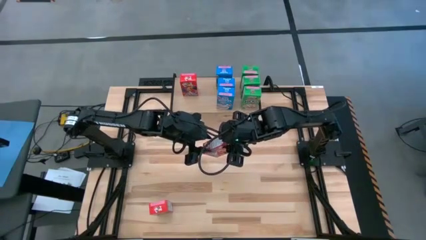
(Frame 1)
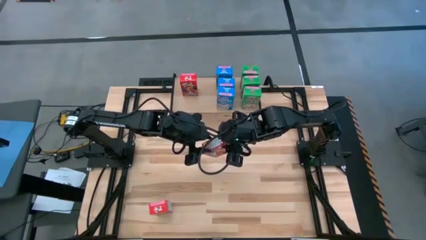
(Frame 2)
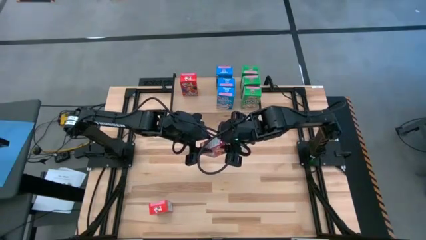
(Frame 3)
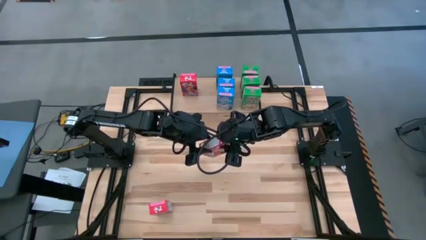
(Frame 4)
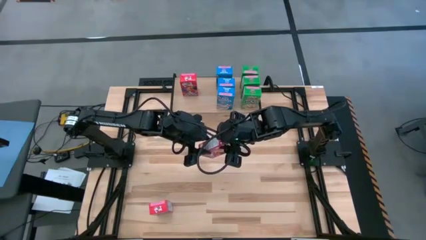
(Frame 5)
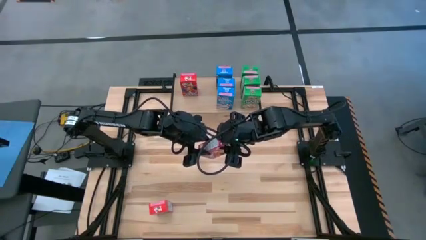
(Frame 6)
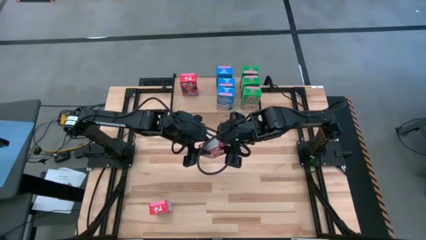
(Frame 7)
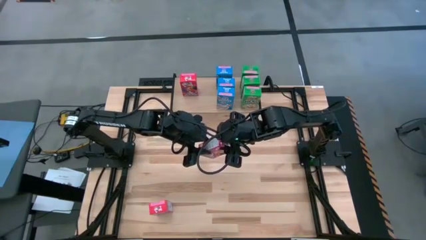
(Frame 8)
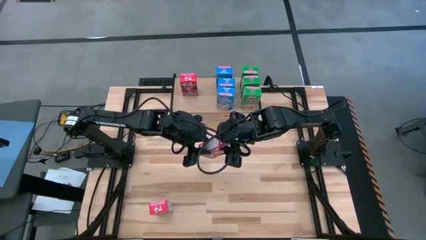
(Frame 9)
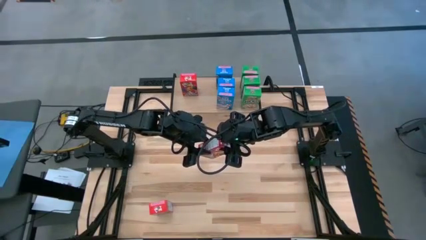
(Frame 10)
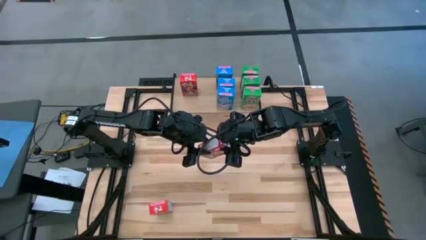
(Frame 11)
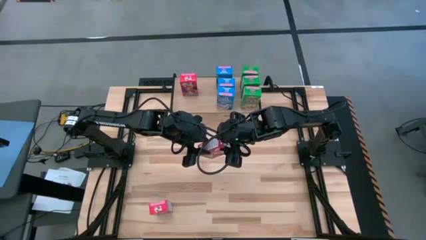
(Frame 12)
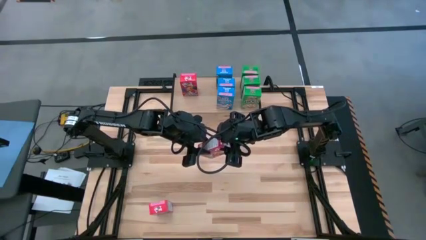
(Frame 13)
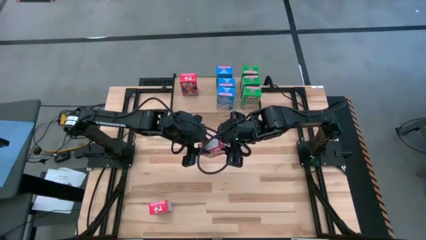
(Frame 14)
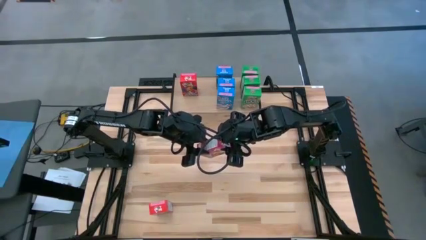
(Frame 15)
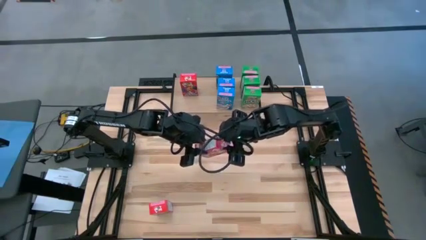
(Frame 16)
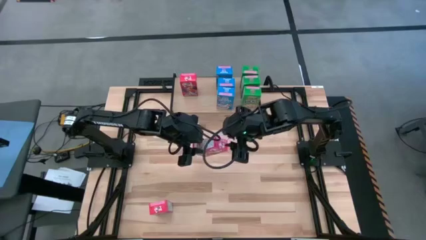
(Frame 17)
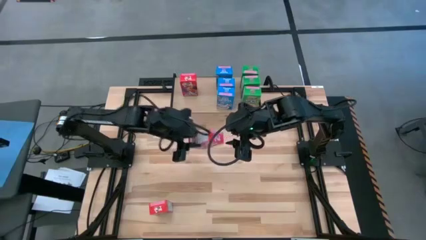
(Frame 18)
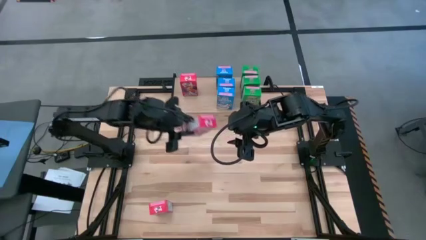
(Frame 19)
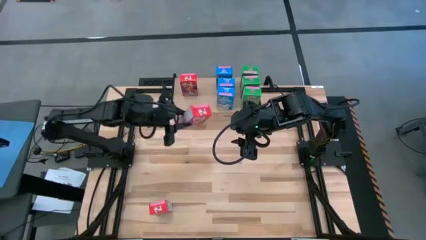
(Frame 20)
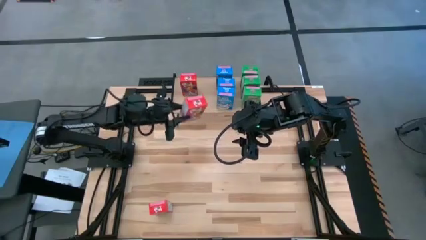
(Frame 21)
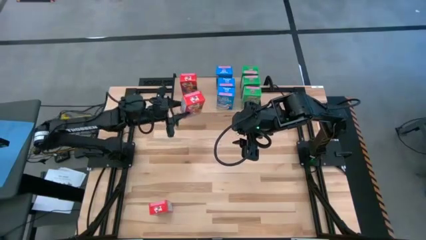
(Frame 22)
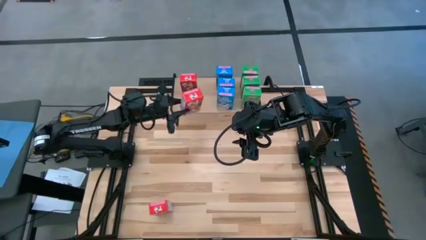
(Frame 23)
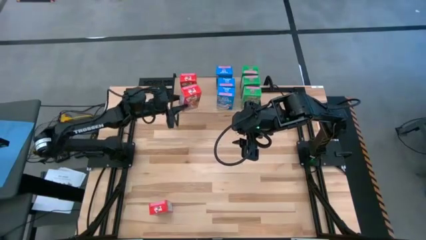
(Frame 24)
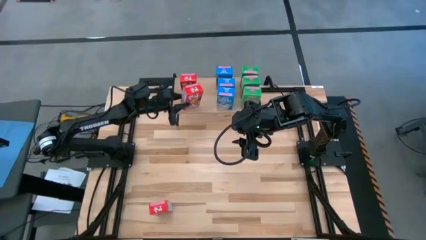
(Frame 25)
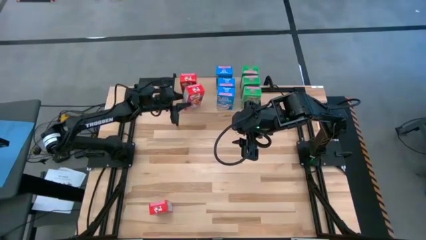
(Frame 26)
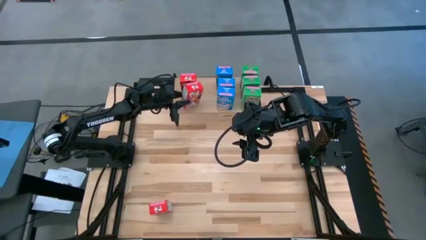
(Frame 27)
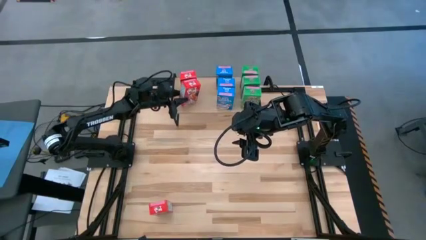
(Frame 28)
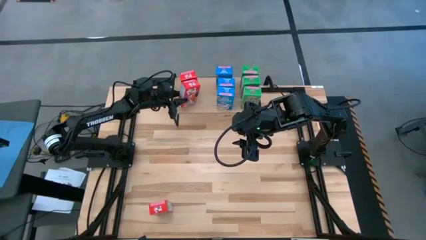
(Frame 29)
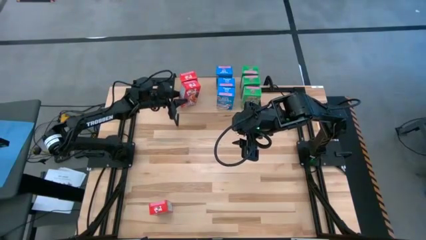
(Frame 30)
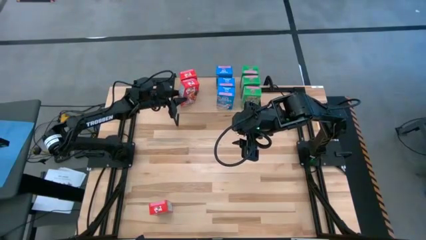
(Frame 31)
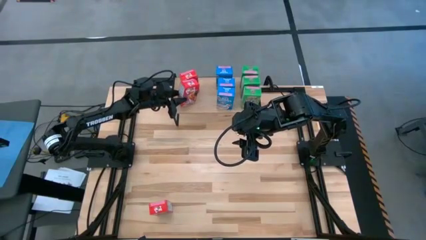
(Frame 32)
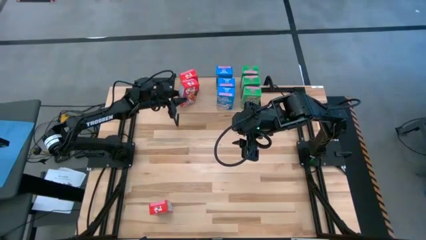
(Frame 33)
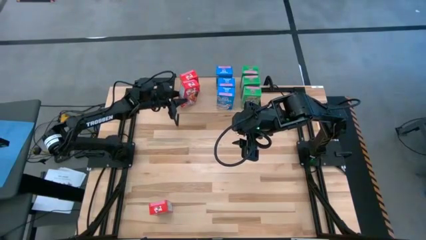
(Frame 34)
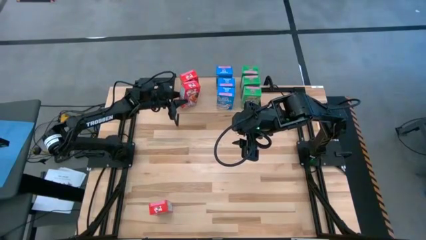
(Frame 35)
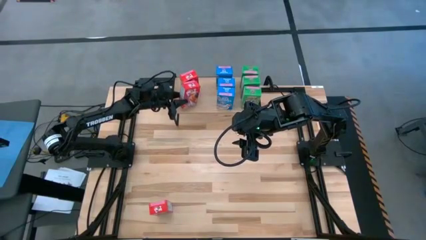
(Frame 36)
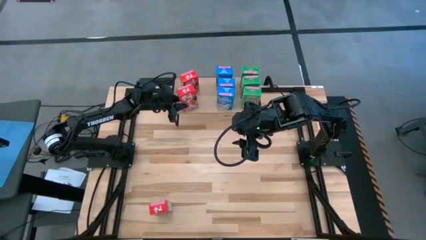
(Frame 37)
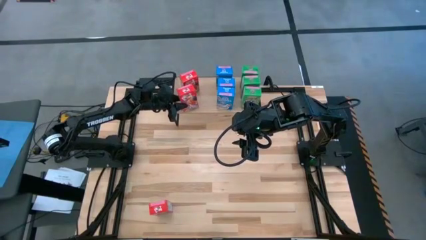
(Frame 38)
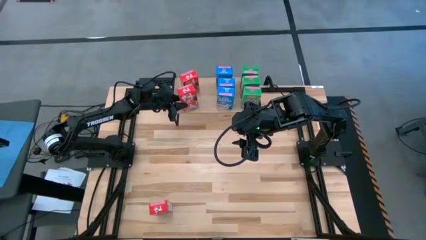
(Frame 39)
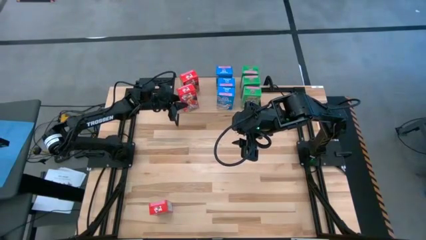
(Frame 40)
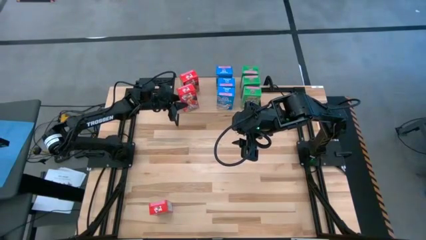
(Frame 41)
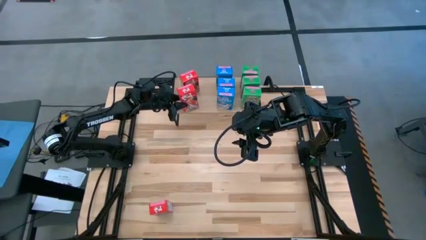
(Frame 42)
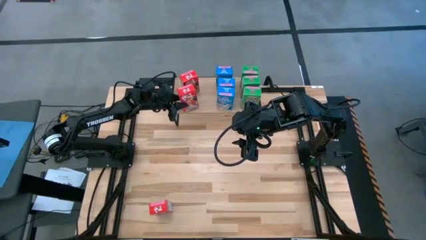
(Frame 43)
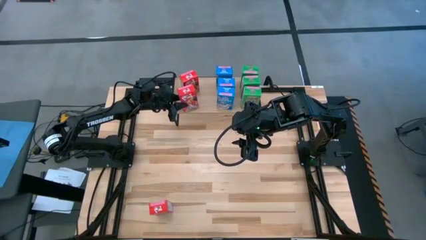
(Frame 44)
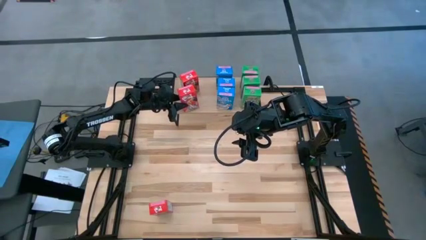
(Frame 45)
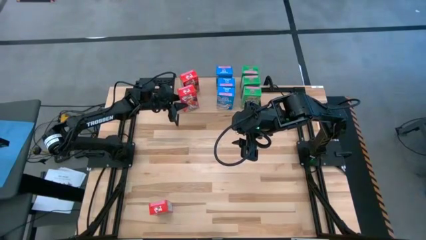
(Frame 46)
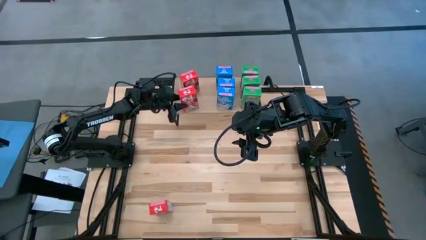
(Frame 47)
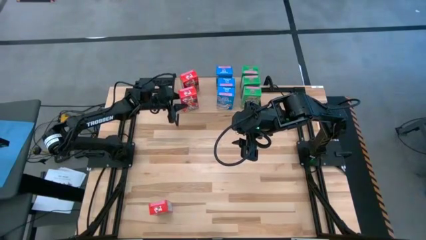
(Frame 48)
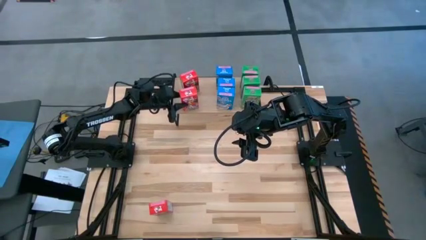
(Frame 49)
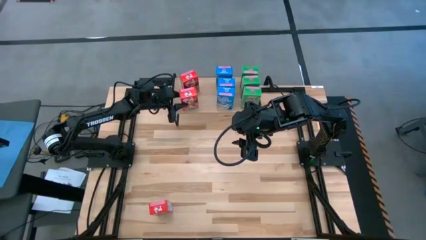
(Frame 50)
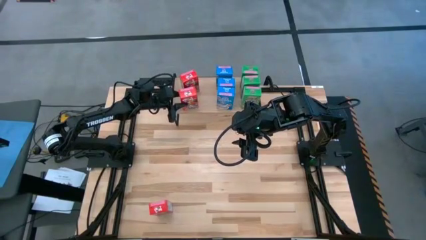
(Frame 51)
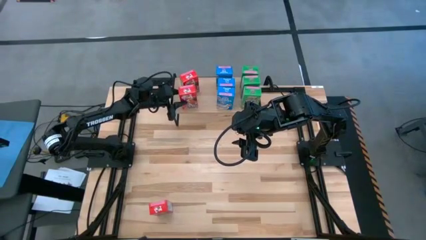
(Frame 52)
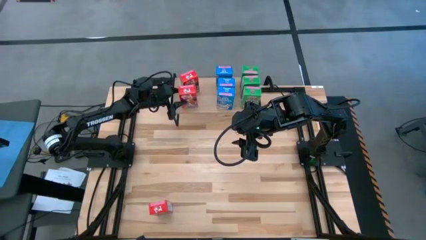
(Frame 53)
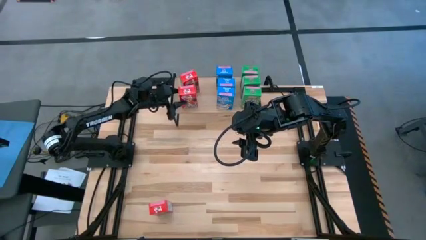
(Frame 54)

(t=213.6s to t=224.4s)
Task: Stack cereal on shelf
Put the right red cereal box on the shelf

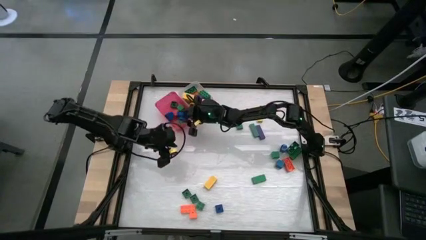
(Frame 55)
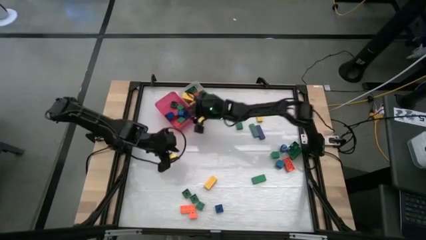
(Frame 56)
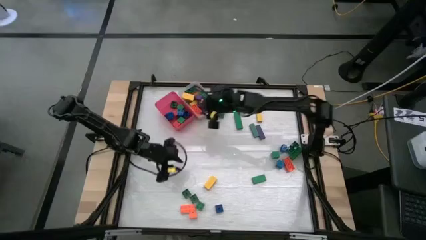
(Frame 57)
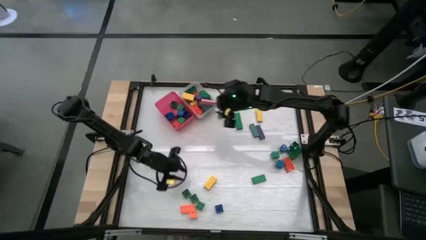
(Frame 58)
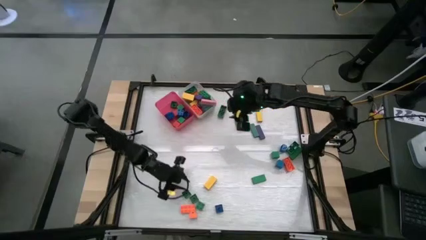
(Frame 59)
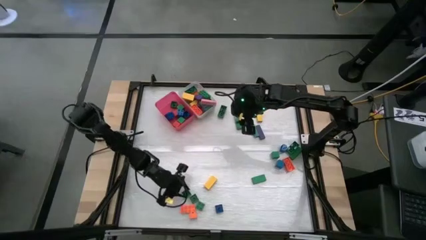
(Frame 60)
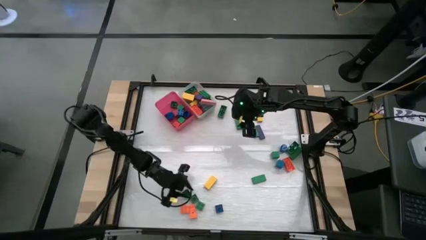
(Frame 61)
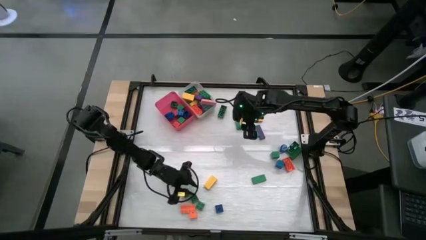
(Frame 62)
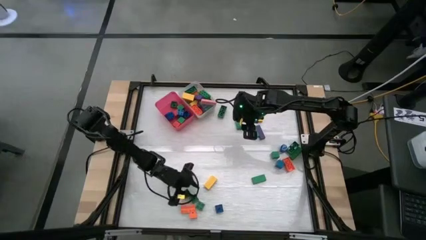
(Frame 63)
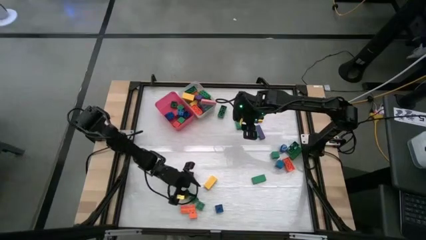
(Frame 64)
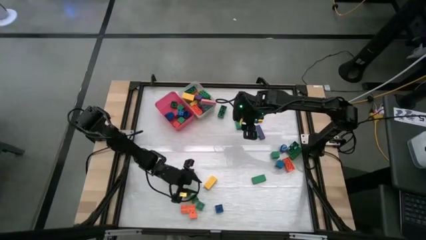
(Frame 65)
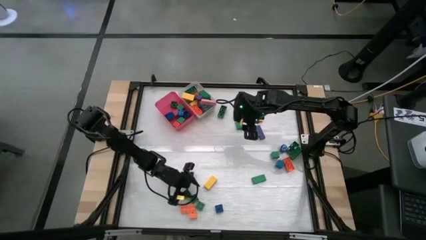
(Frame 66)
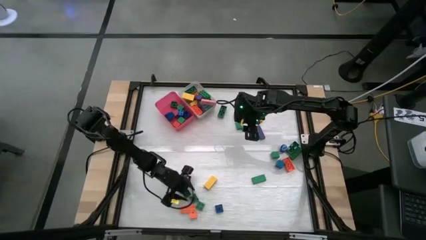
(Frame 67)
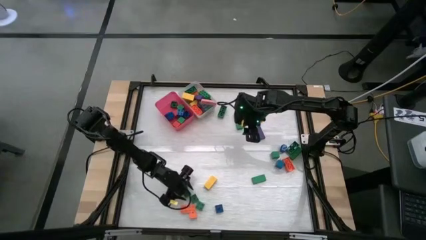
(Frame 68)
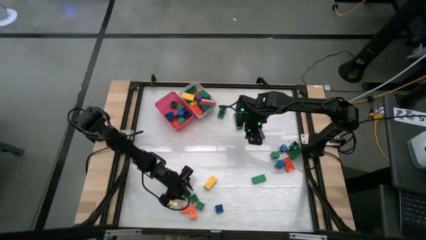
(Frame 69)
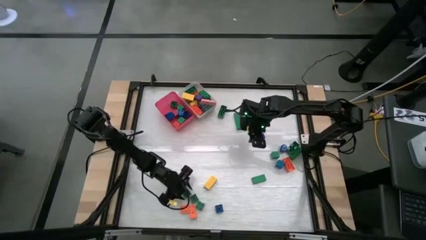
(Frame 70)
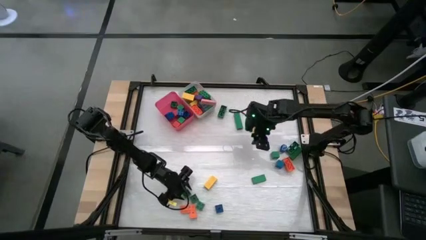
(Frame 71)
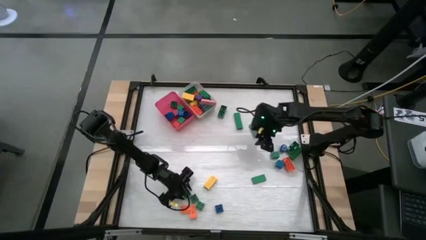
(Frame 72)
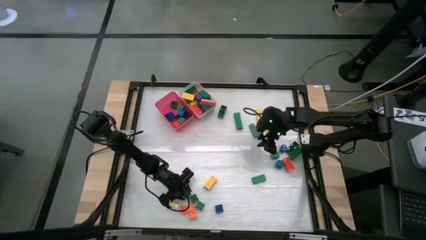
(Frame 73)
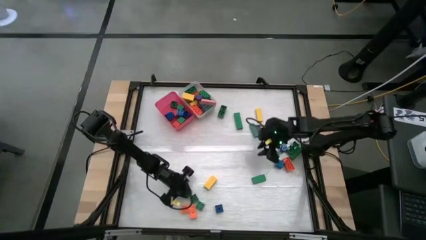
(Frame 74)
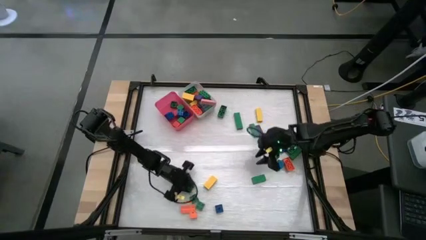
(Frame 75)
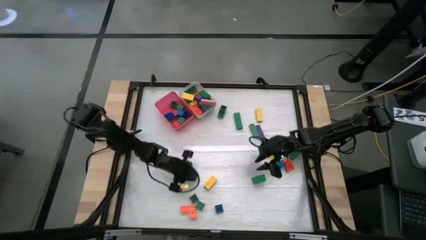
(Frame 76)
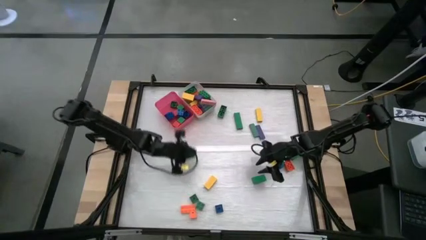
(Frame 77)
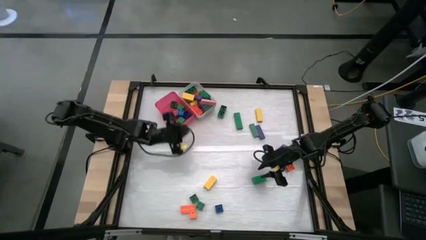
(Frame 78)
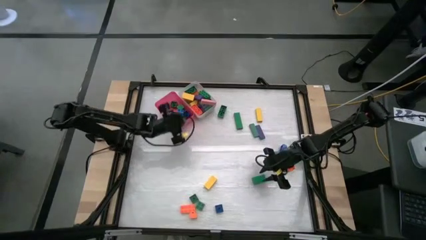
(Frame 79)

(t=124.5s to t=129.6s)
Task: Sort blocks by size
Put the small green game piece into the pink bin
